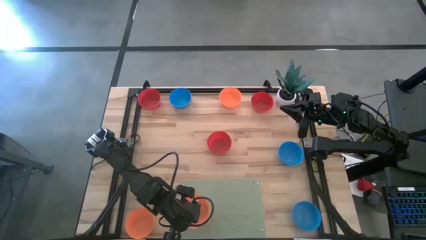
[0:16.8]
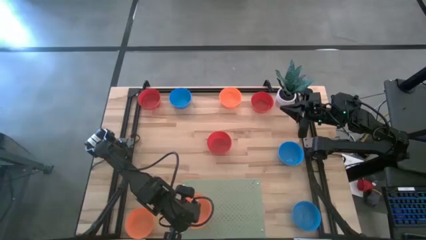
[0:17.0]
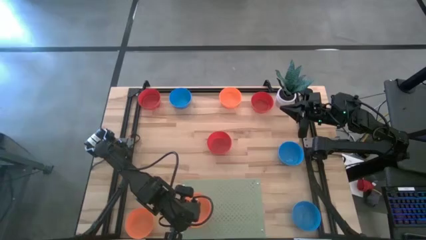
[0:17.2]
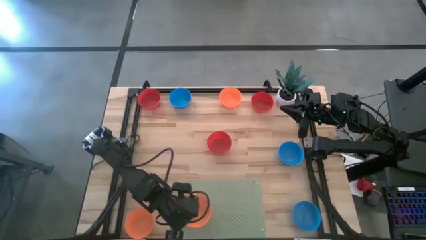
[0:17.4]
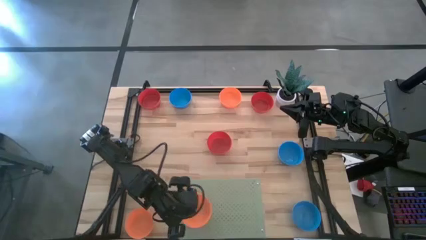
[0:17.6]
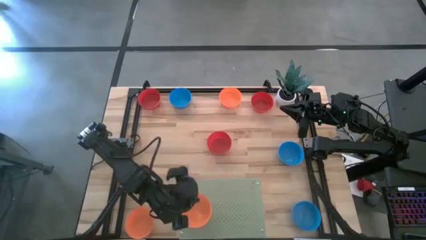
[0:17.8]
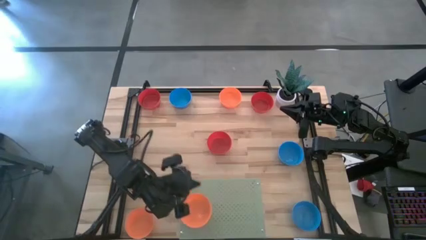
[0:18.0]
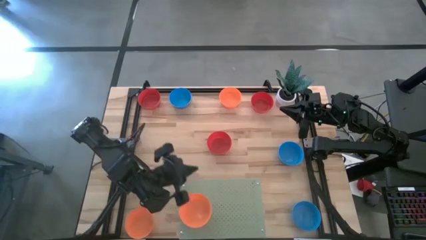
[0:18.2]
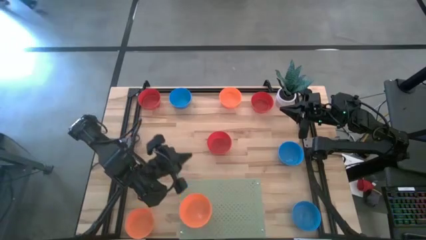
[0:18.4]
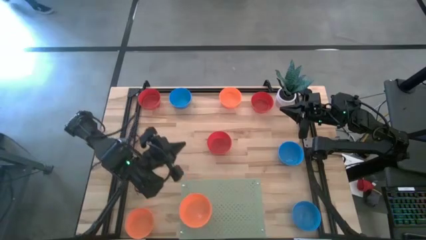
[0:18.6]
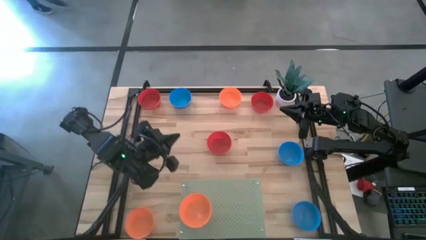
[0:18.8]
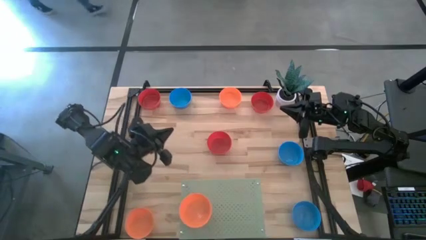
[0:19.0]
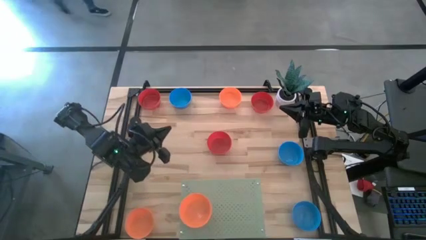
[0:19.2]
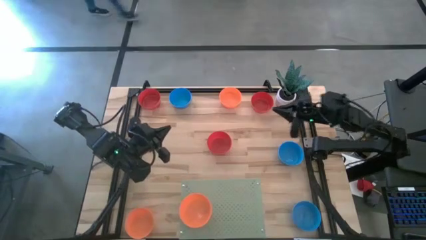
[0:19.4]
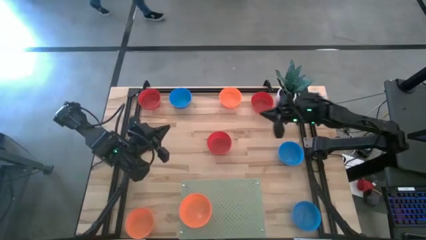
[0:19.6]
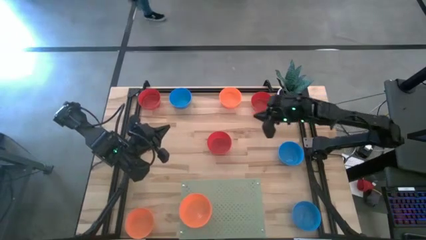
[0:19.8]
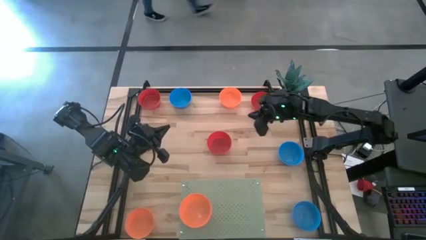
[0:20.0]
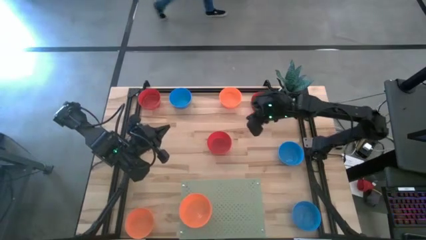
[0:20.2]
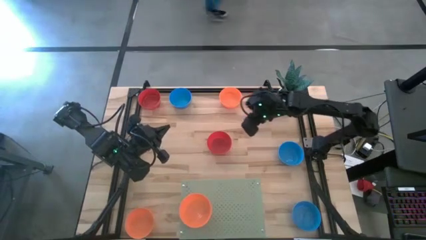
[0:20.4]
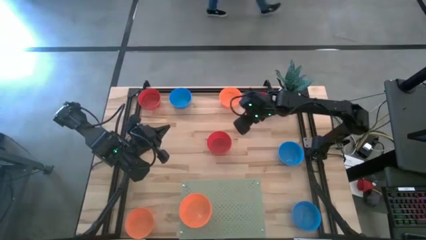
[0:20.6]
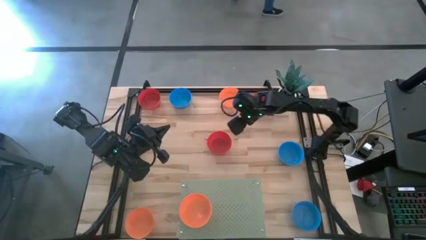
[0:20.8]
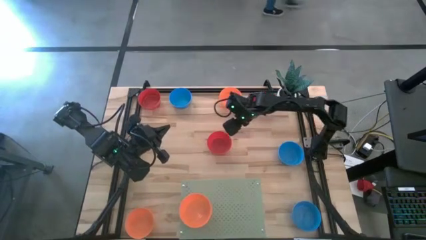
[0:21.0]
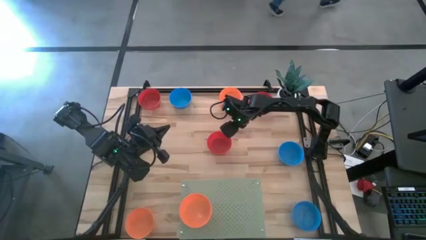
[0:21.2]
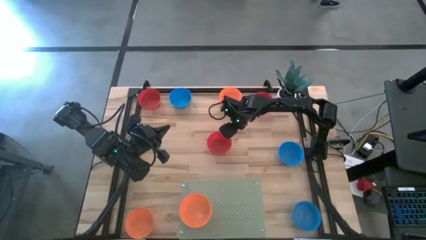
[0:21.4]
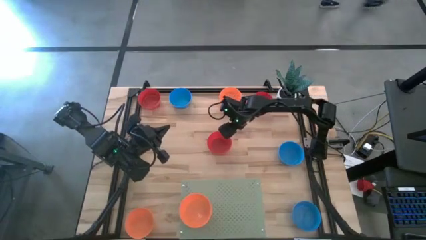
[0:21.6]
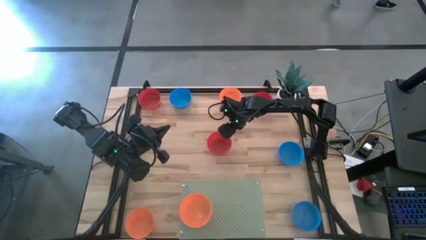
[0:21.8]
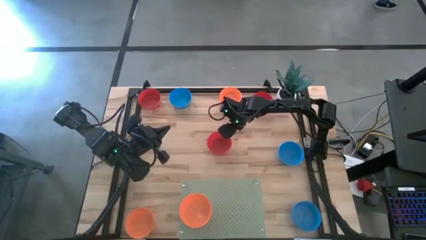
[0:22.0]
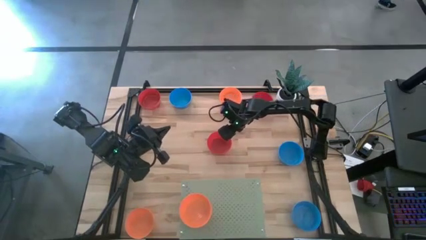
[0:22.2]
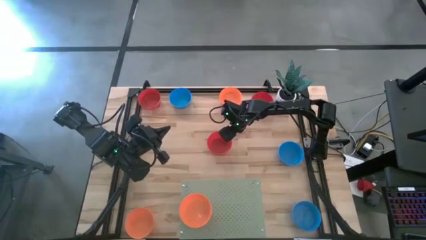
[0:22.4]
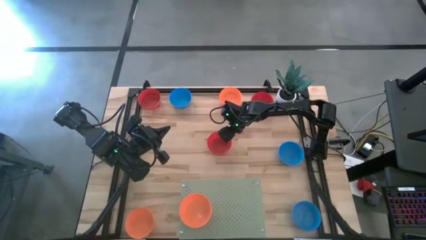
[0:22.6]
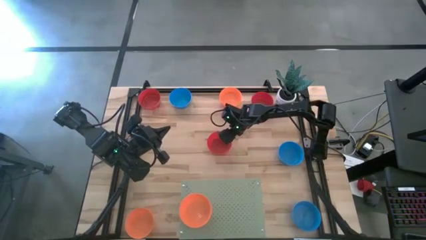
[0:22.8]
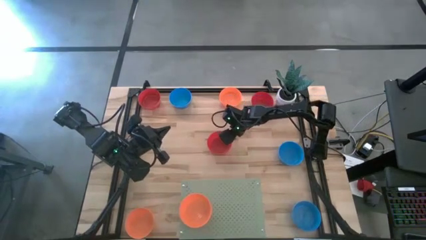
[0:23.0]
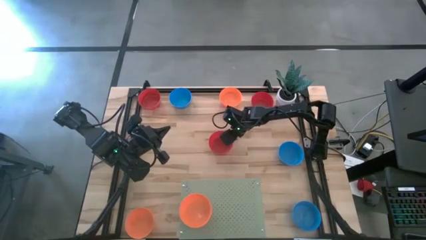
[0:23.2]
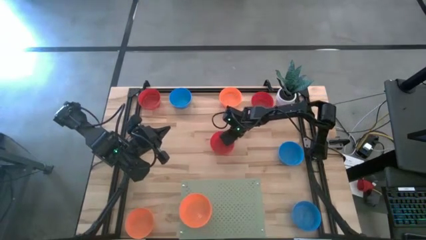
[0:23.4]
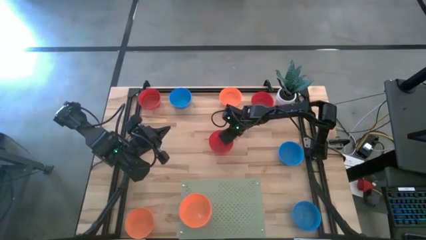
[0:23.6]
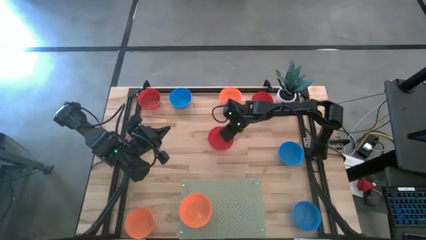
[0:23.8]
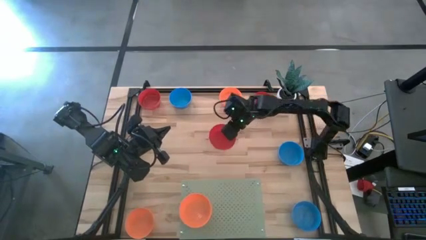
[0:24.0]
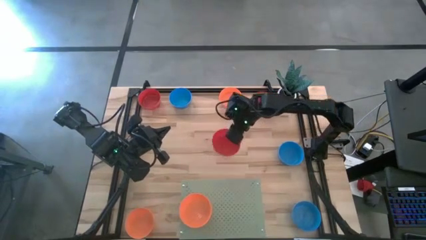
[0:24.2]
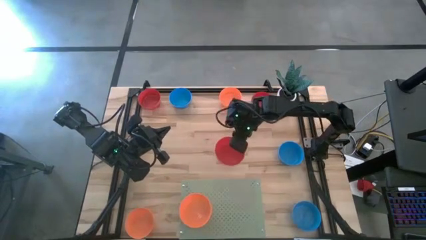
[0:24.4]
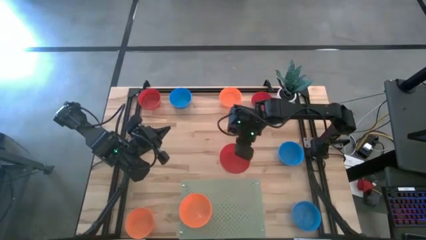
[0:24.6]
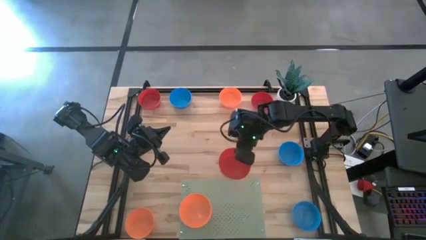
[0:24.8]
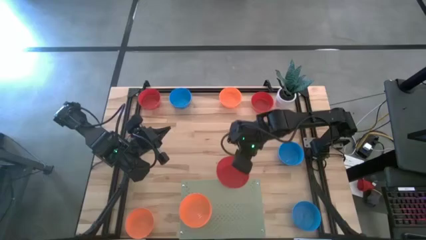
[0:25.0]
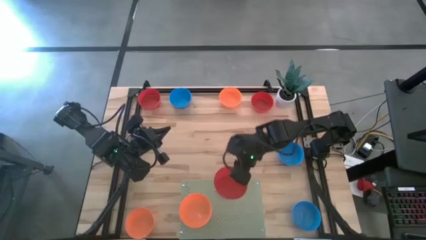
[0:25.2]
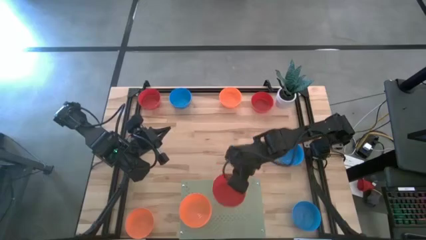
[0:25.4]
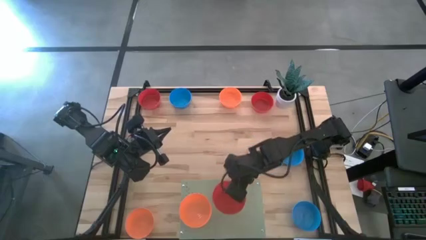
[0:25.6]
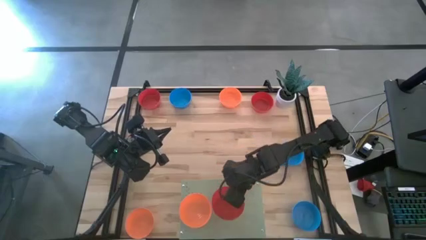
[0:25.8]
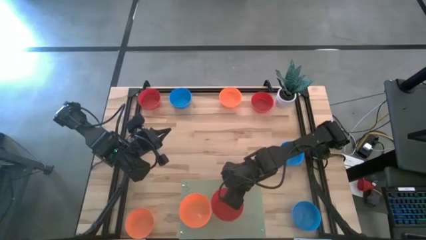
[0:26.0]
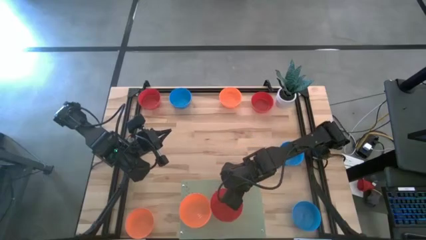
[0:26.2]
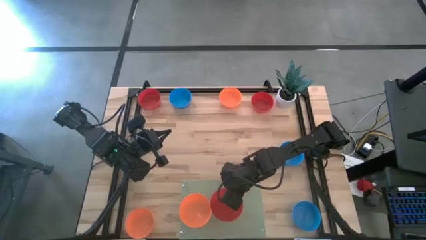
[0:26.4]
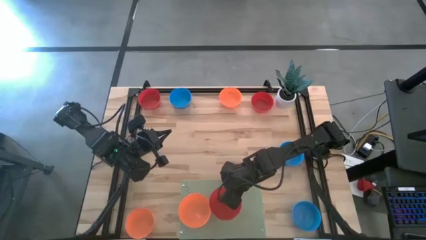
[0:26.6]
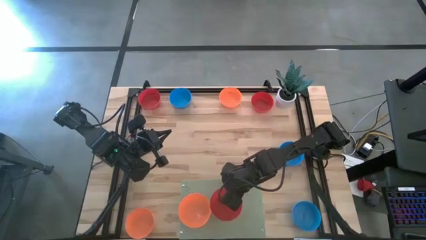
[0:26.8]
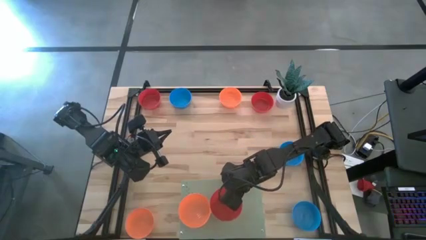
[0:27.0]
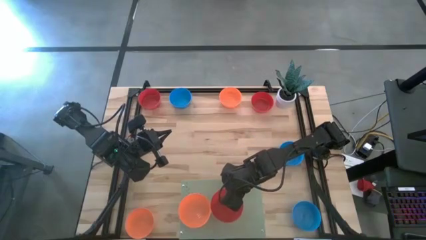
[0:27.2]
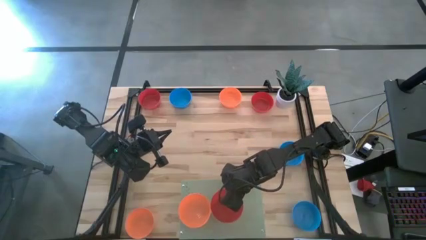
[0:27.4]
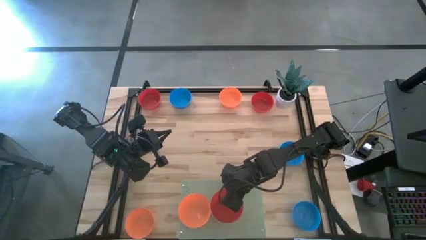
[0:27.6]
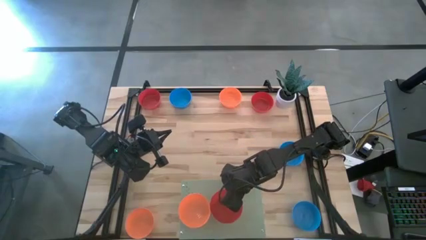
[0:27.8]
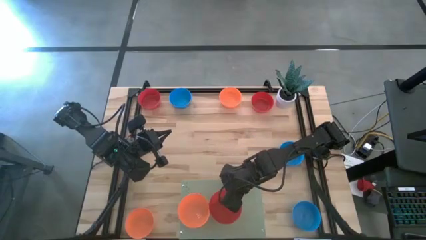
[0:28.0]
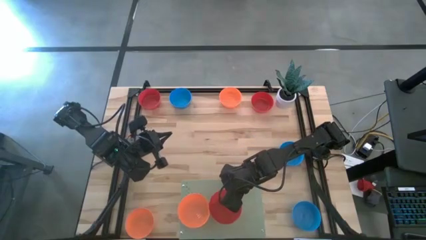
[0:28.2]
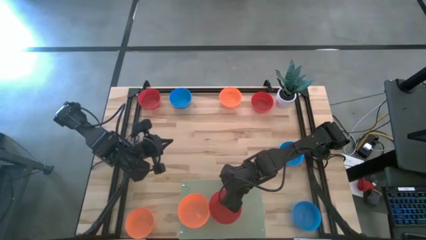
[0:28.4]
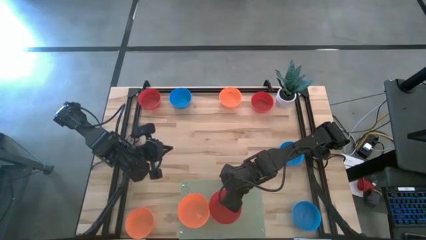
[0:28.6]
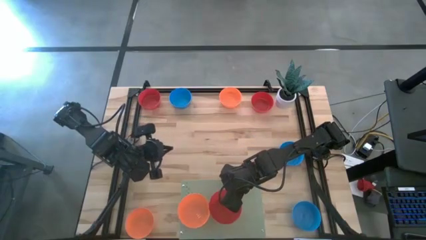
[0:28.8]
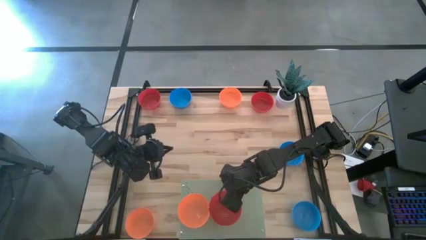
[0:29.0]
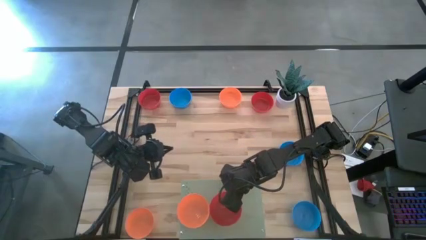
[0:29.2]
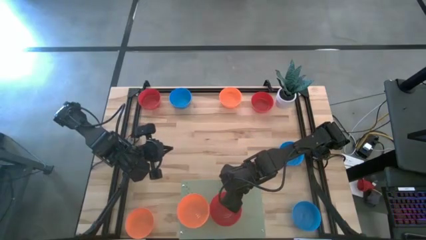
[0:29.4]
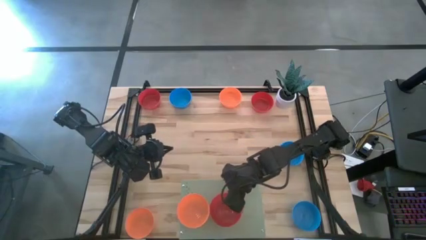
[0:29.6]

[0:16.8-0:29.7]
Task: Pick & Place Mini bowls
Put the bottom red bowl on the shelf

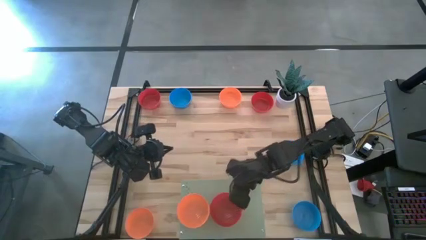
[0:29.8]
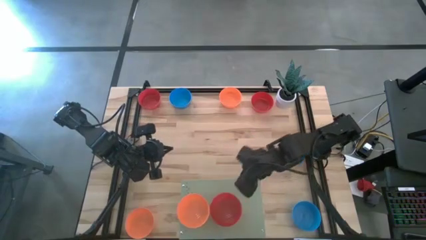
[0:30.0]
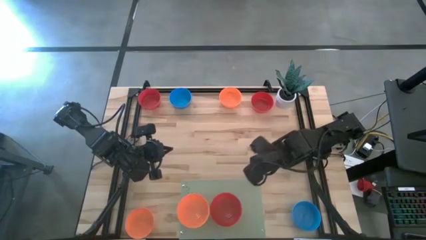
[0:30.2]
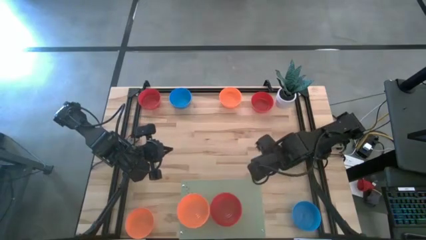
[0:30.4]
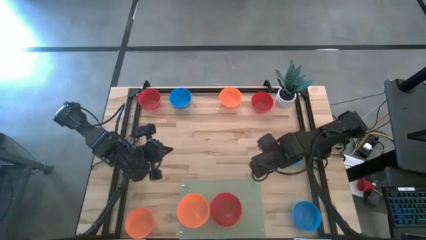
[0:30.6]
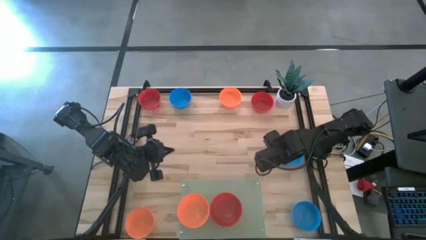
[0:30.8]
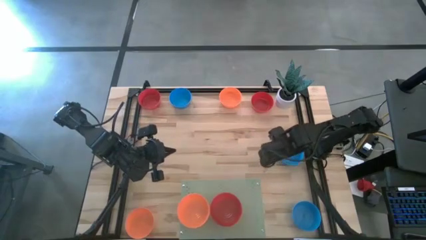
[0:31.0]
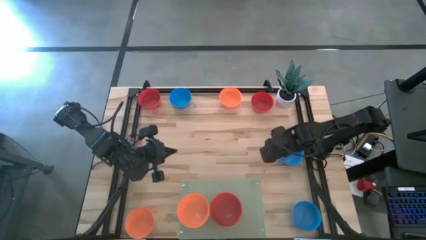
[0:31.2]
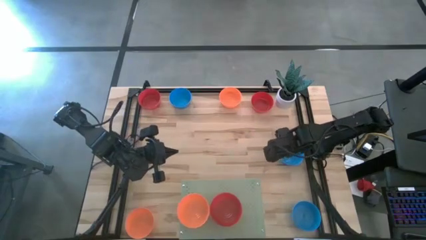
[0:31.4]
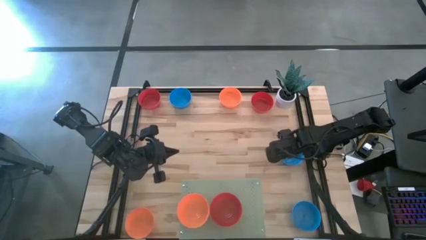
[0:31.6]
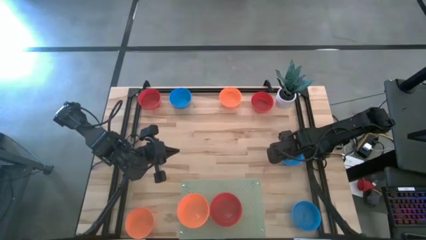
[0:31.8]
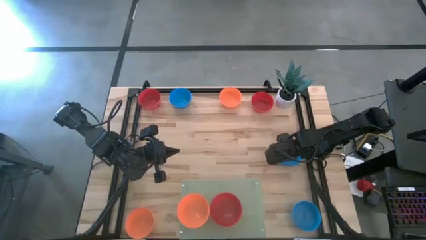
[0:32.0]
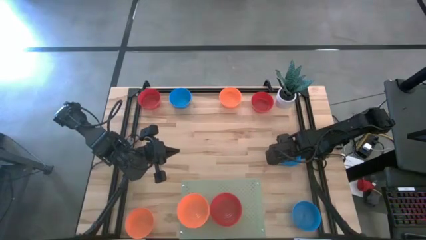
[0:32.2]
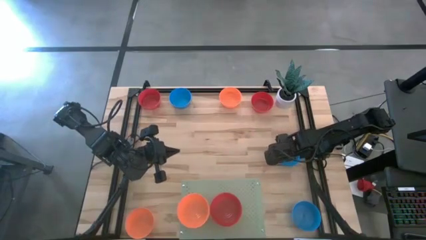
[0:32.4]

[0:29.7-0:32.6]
Put the middle blue bowl on the shelf
